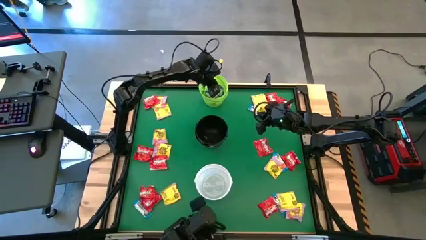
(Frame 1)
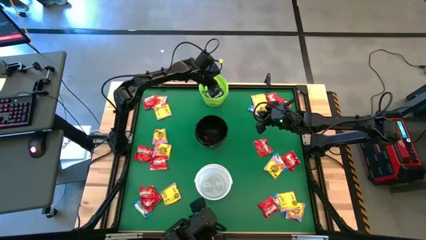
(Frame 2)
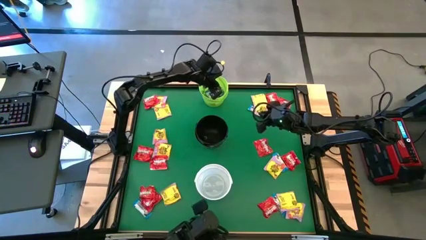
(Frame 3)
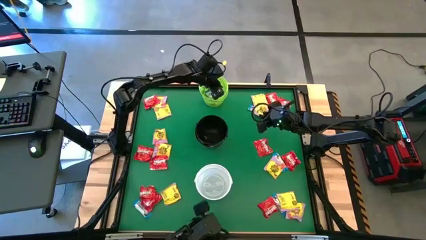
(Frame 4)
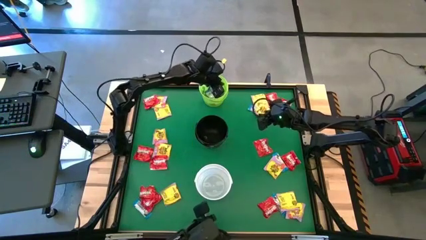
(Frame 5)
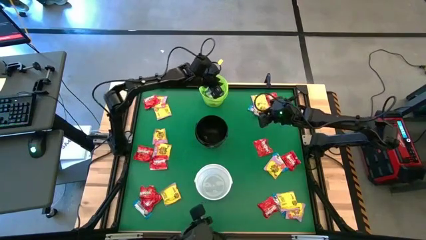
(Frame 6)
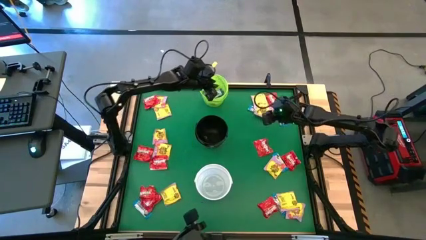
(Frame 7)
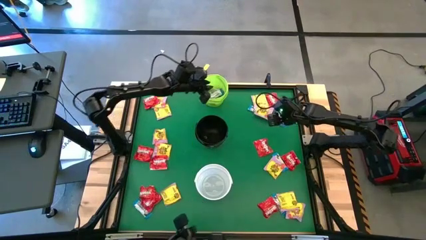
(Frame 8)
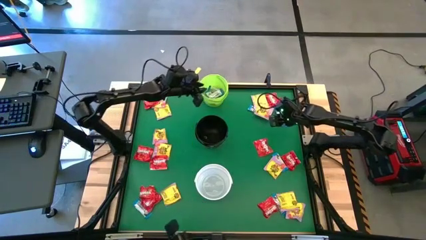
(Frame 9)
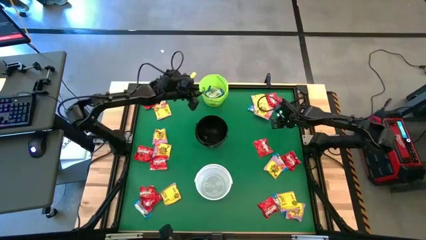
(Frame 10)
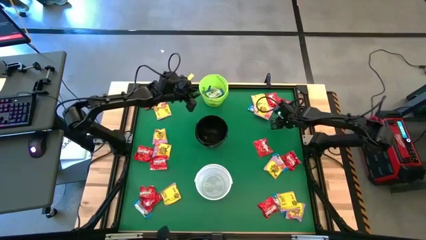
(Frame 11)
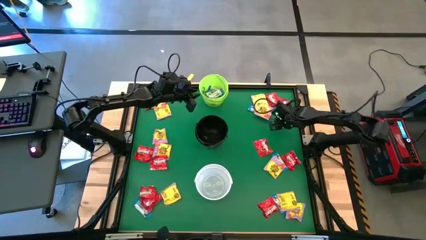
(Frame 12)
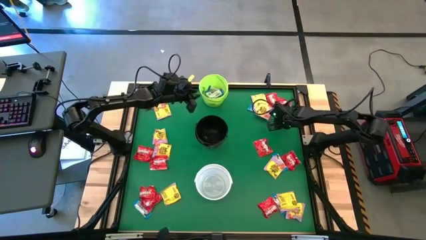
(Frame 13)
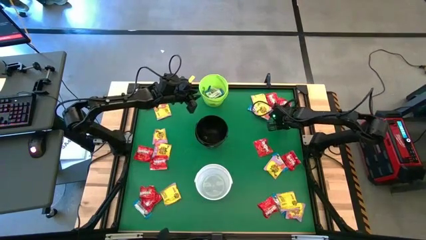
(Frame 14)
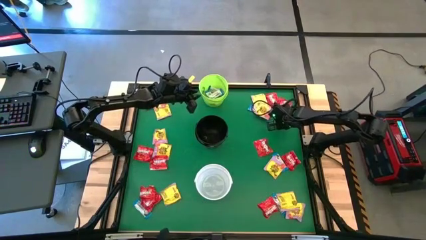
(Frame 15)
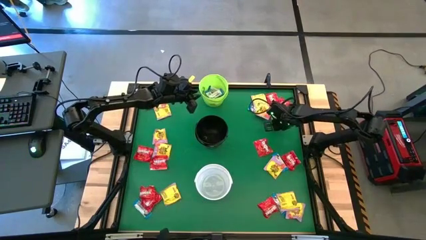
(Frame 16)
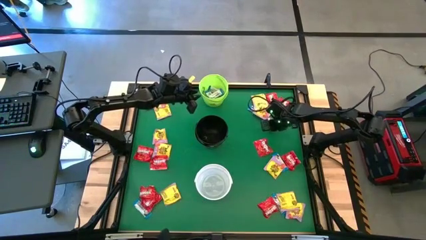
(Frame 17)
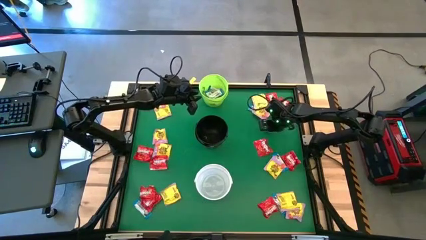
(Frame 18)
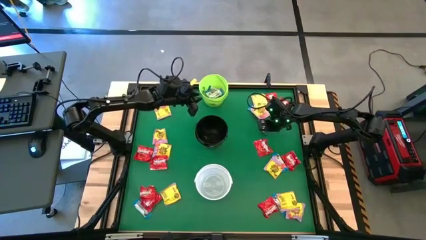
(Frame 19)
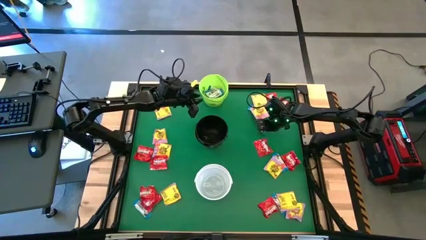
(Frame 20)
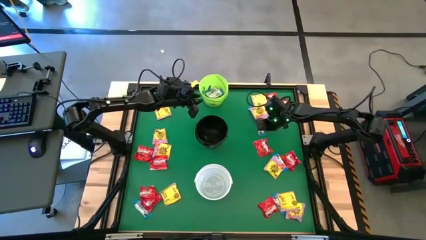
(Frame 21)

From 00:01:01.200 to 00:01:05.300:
Task: Sort candy by brand, put in halloween buckets
Put the white chocolate into the green bucket

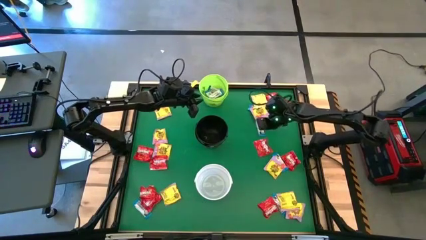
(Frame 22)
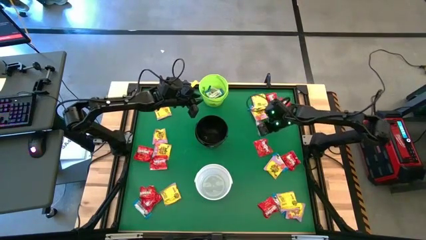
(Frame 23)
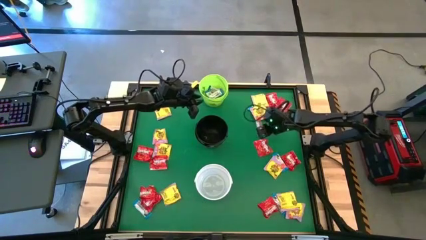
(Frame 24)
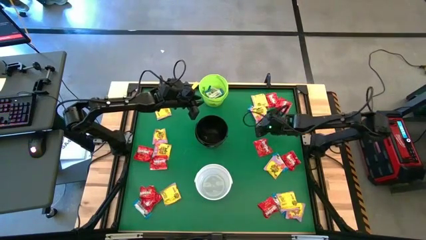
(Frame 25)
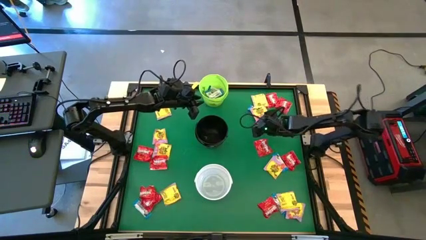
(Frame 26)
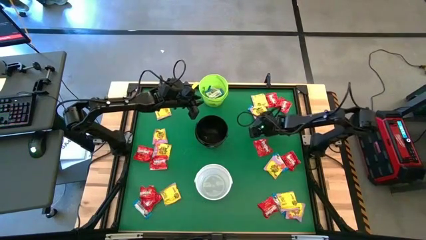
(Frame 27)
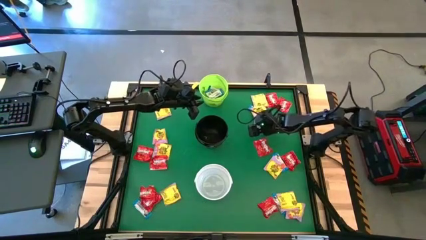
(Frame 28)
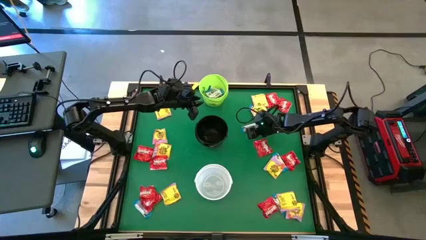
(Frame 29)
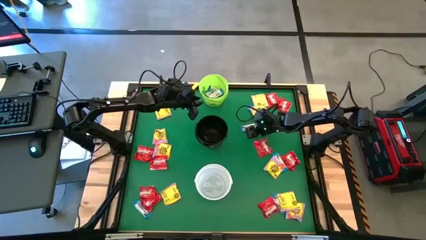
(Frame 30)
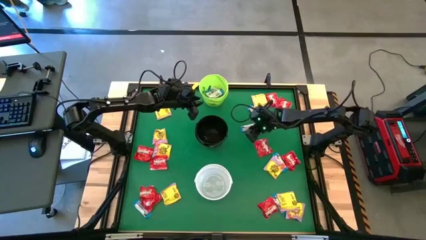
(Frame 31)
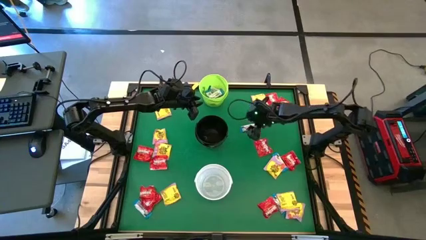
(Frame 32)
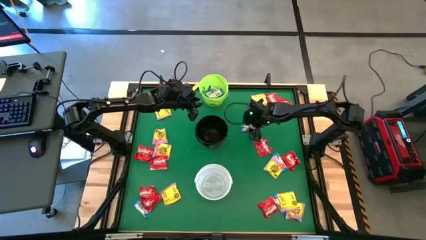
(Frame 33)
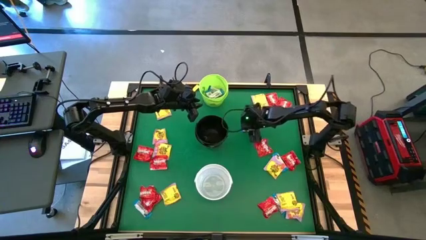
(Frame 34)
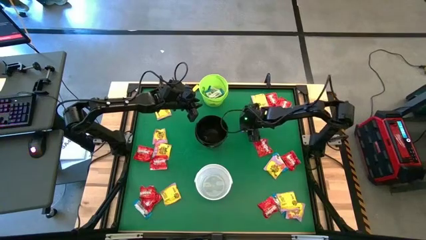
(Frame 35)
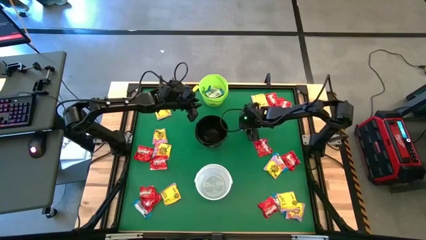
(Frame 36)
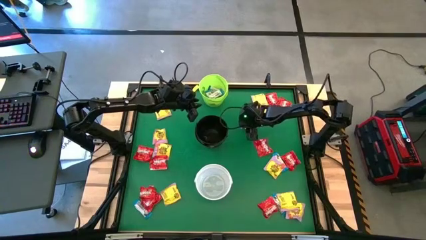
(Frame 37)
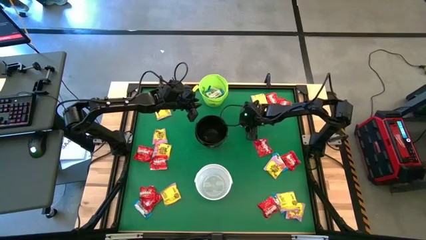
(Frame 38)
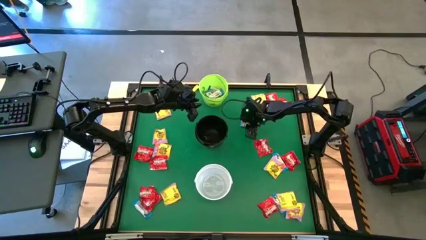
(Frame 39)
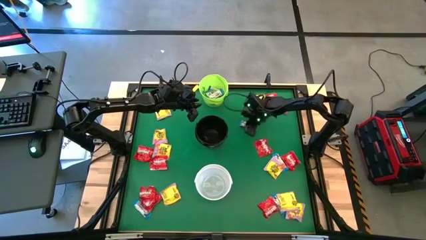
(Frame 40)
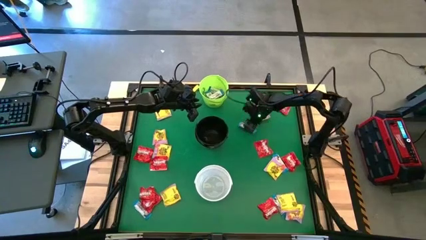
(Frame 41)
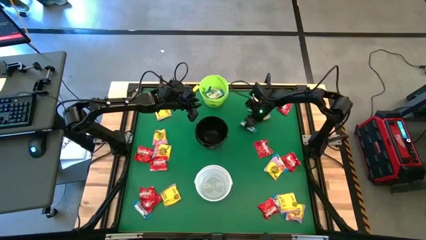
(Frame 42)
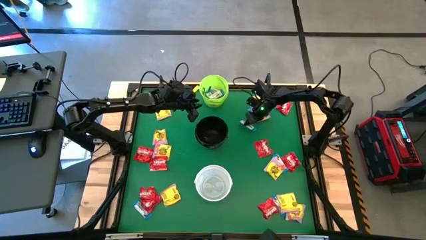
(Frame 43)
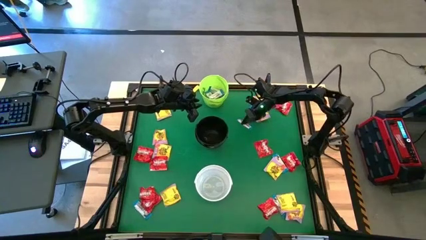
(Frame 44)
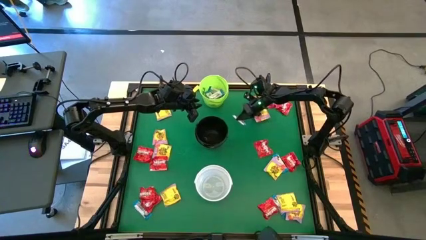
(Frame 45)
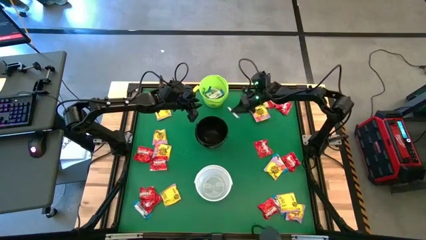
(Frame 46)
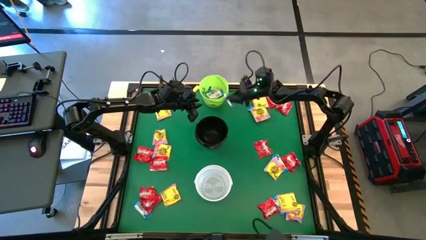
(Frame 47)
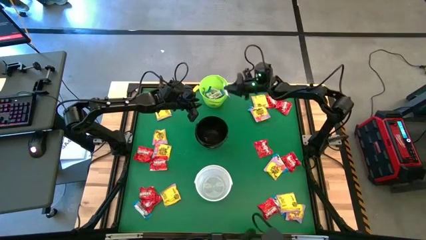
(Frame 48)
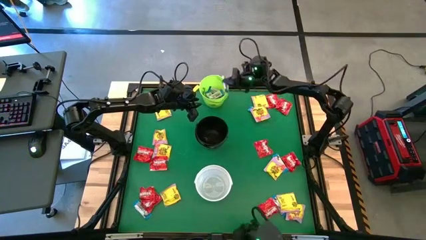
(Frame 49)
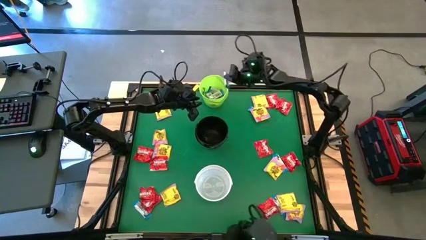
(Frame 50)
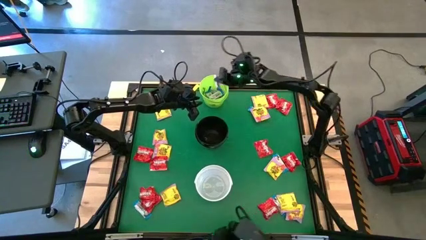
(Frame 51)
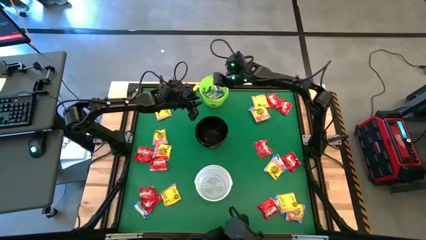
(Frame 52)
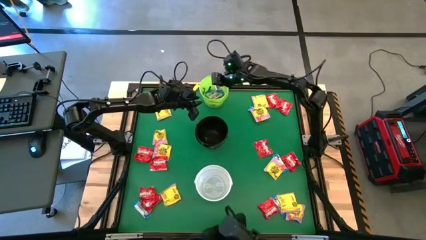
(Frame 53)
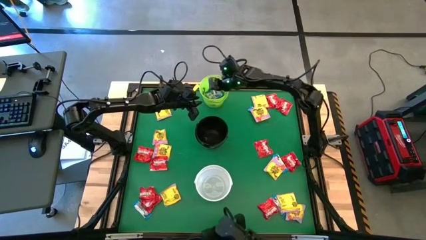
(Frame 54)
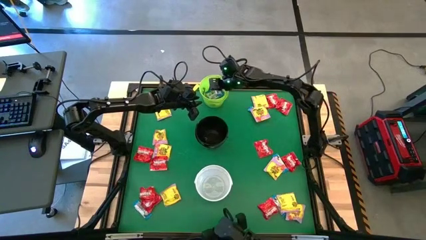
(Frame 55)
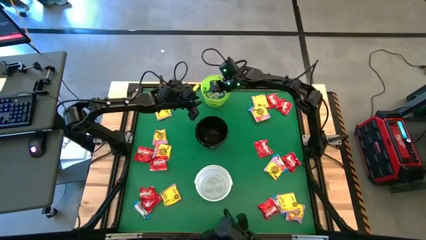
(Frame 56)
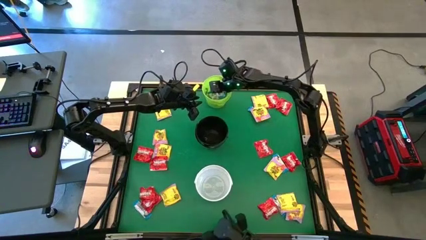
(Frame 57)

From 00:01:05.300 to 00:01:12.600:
Put the white chocolate into the green bucket

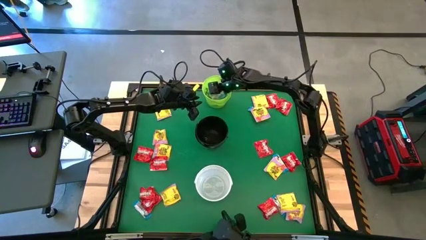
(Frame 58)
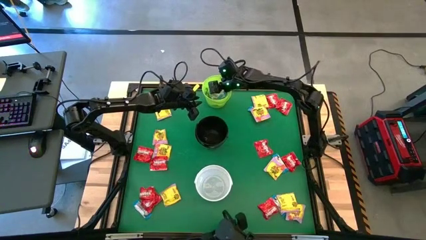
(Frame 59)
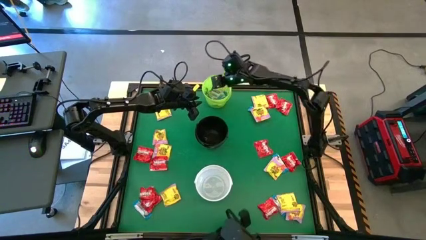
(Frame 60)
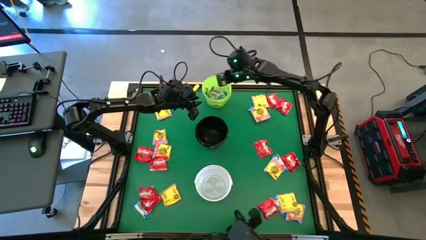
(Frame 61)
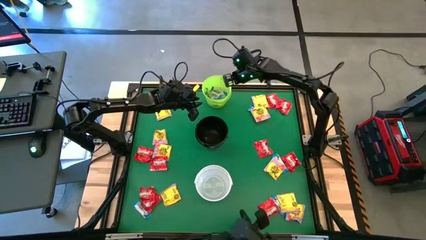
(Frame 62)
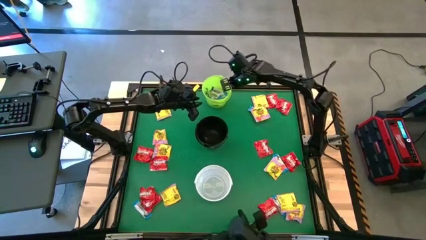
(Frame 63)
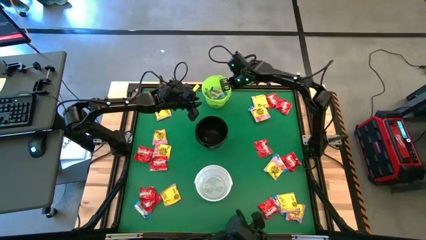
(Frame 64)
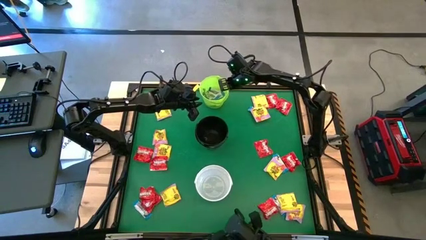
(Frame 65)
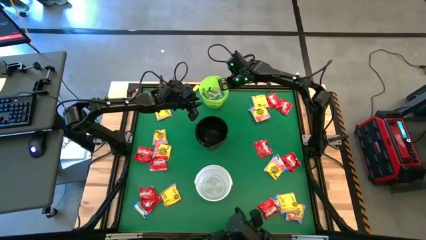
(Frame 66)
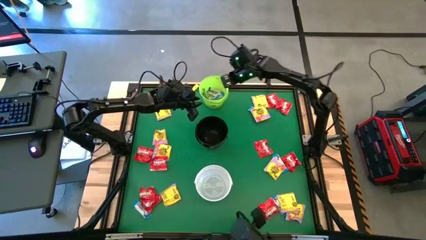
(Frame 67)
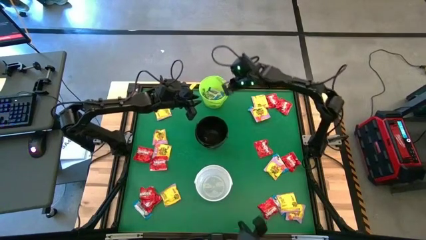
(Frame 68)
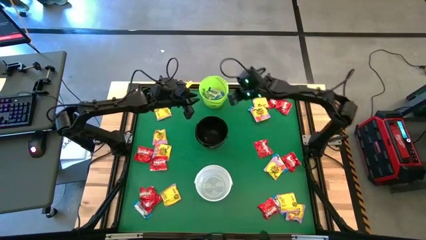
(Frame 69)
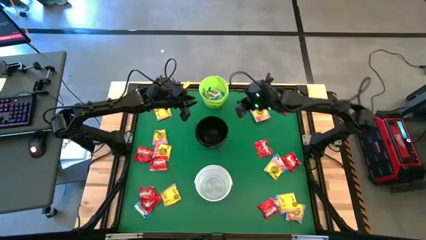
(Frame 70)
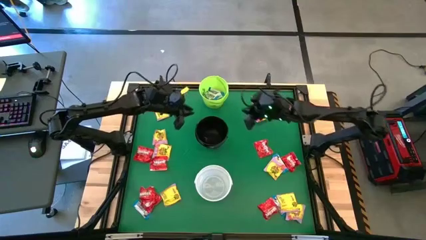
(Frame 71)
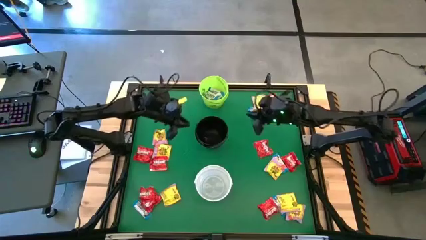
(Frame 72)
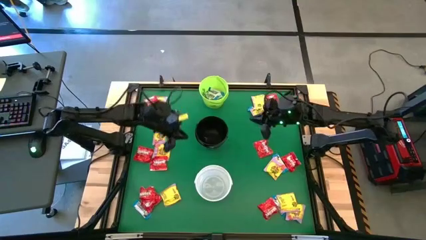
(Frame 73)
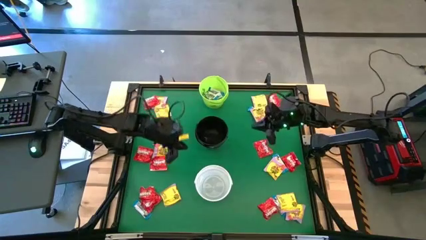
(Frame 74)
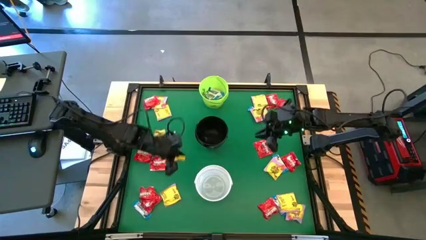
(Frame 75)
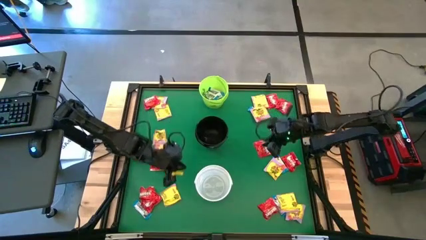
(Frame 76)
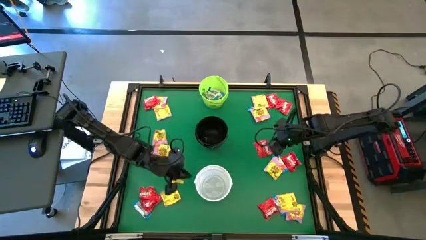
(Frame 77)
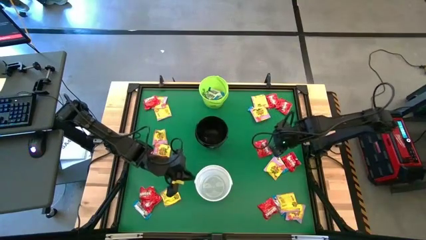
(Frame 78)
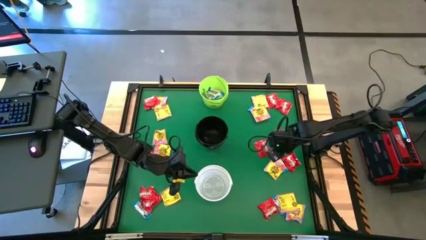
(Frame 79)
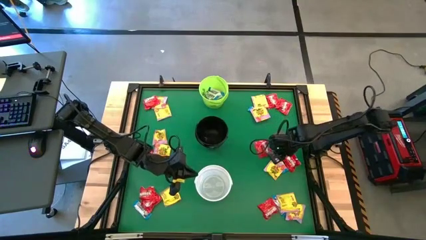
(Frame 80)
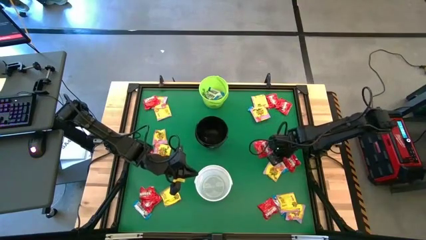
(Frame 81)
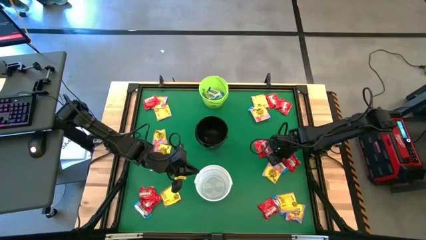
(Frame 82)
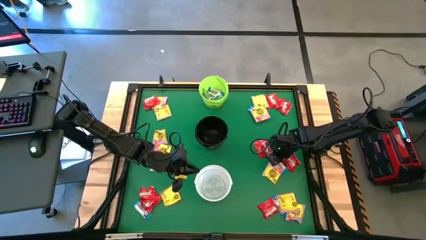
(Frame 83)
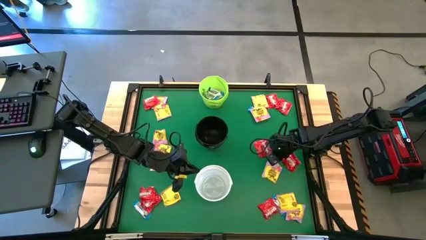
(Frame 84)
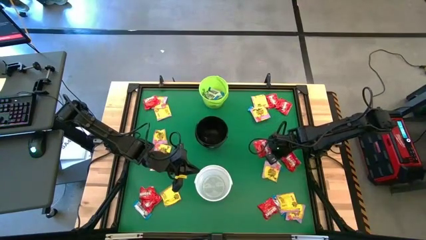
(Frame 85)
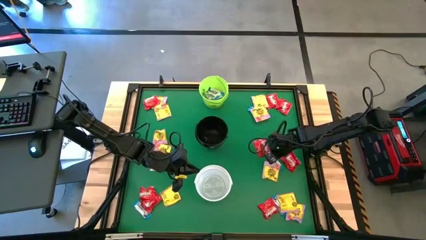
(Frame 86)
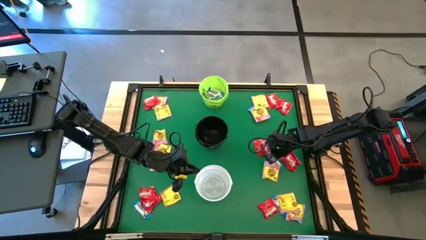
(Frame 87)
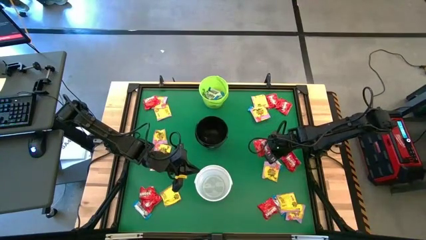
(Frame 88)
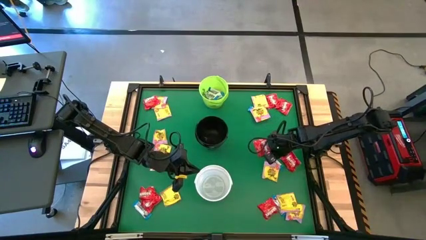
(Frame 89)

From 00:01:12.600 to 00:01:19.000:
Put the white chocolate into the green bucket
